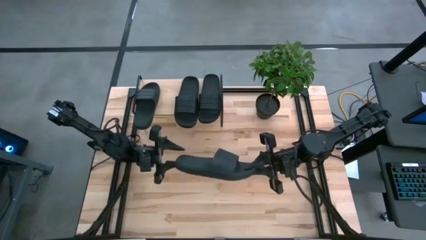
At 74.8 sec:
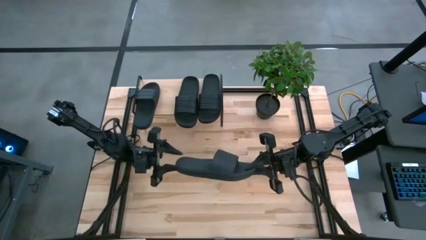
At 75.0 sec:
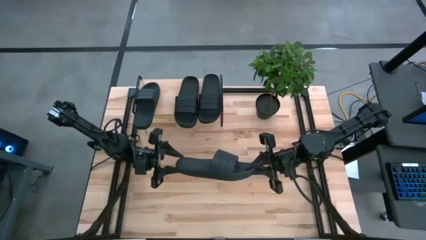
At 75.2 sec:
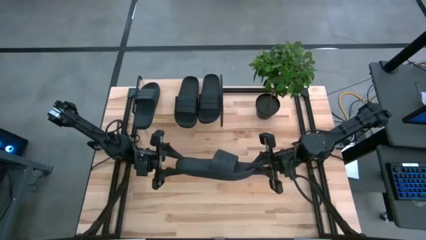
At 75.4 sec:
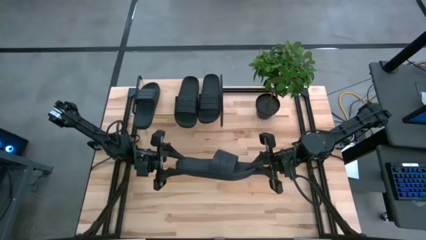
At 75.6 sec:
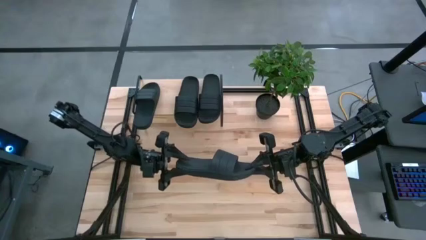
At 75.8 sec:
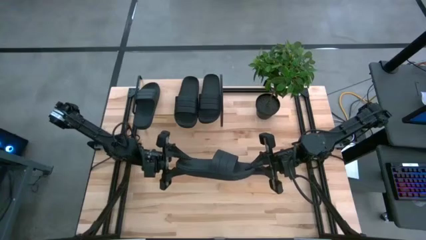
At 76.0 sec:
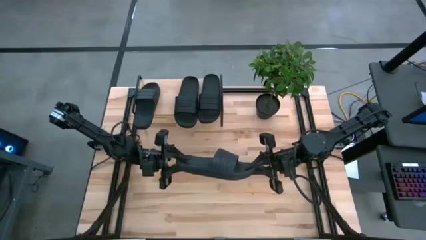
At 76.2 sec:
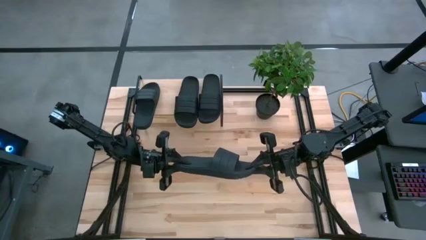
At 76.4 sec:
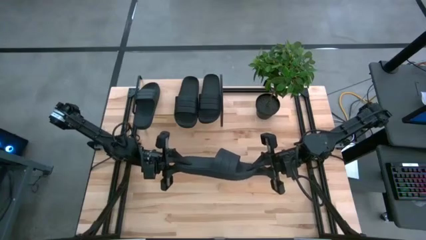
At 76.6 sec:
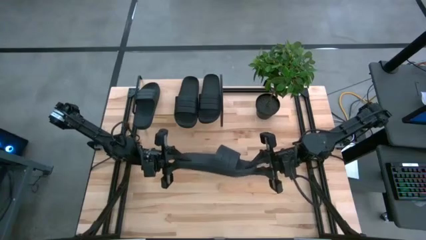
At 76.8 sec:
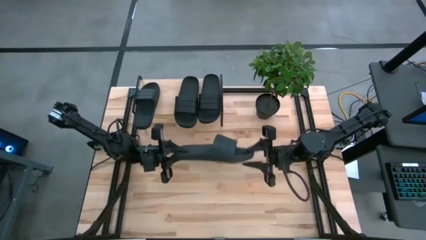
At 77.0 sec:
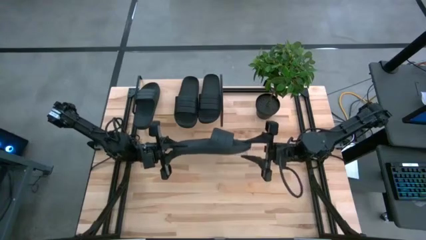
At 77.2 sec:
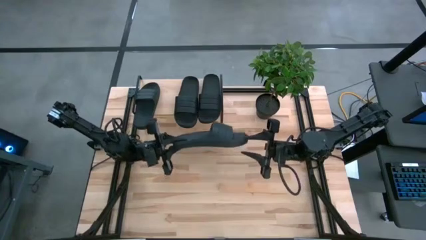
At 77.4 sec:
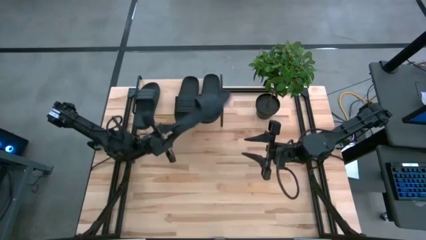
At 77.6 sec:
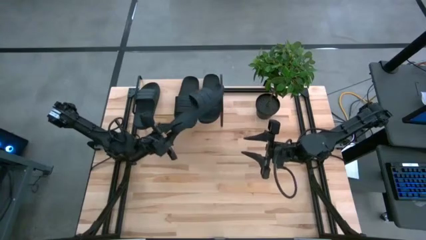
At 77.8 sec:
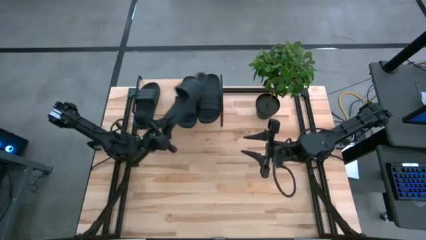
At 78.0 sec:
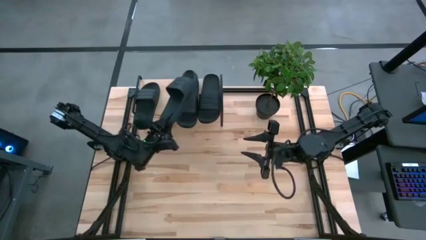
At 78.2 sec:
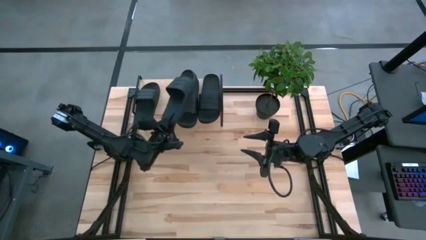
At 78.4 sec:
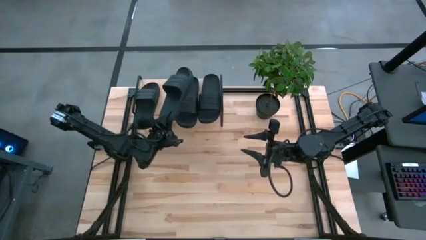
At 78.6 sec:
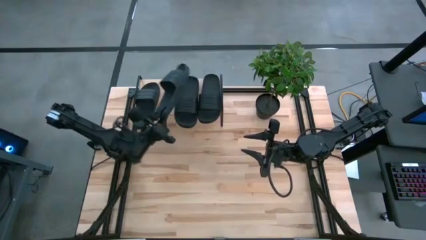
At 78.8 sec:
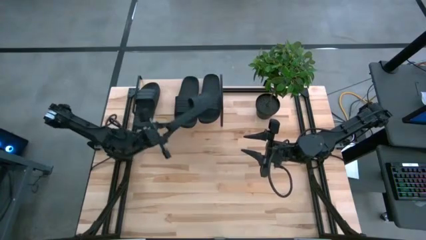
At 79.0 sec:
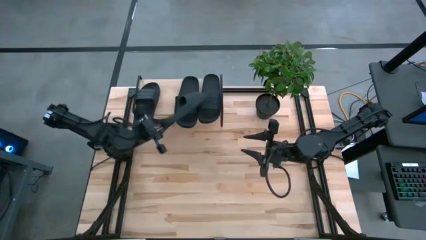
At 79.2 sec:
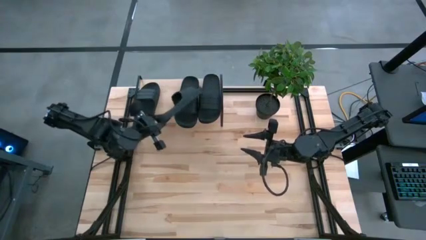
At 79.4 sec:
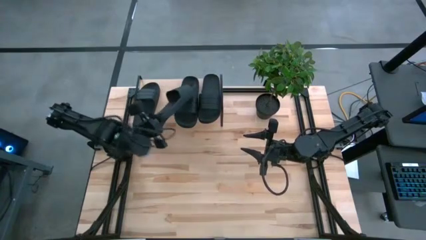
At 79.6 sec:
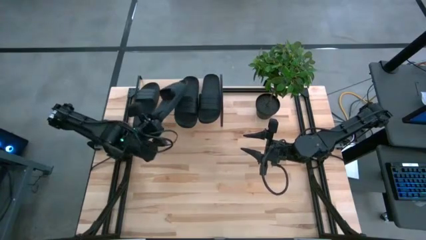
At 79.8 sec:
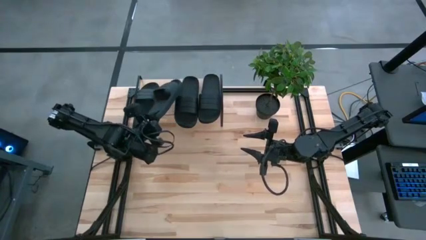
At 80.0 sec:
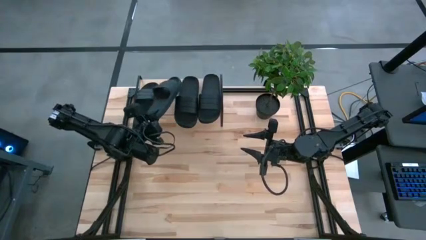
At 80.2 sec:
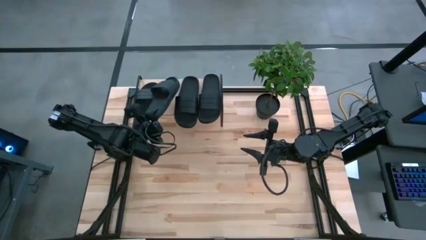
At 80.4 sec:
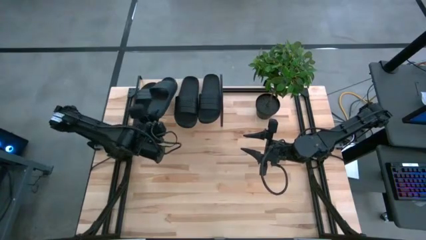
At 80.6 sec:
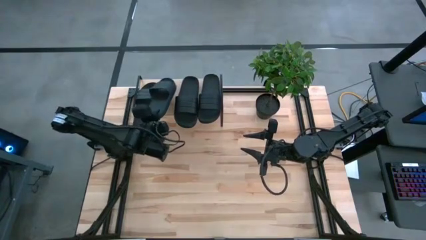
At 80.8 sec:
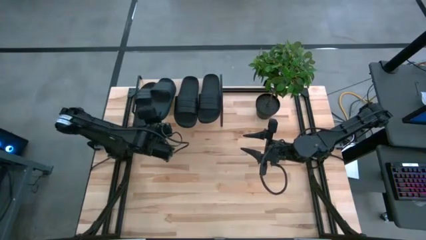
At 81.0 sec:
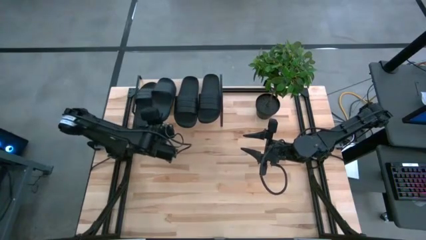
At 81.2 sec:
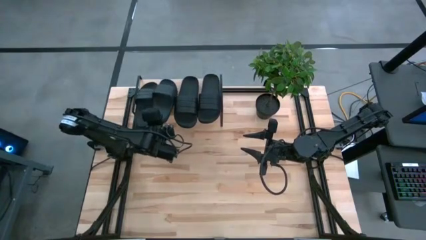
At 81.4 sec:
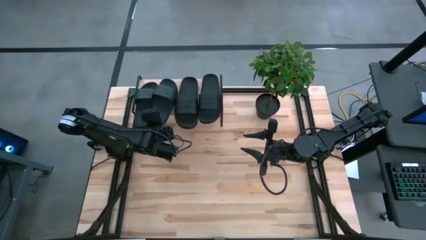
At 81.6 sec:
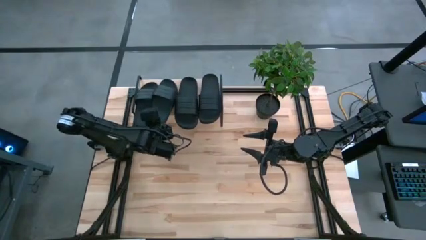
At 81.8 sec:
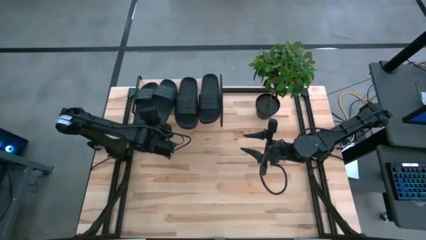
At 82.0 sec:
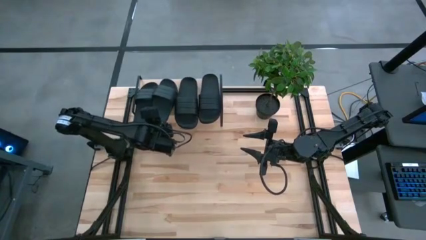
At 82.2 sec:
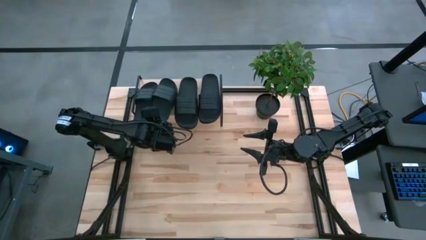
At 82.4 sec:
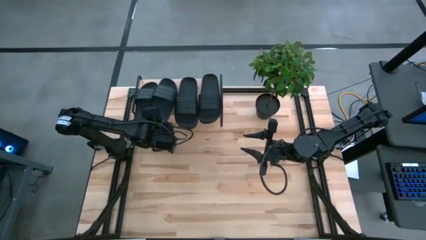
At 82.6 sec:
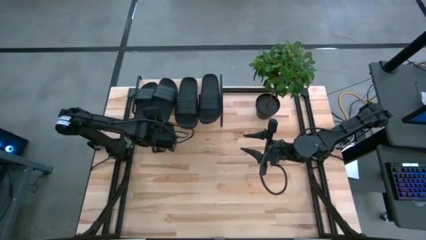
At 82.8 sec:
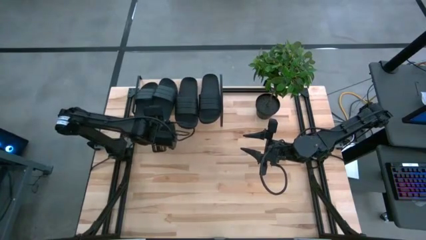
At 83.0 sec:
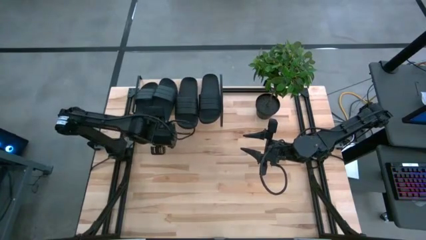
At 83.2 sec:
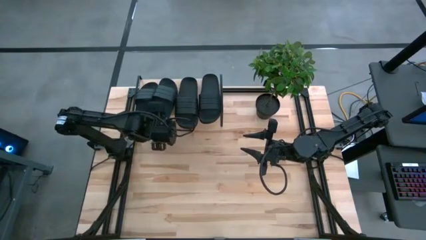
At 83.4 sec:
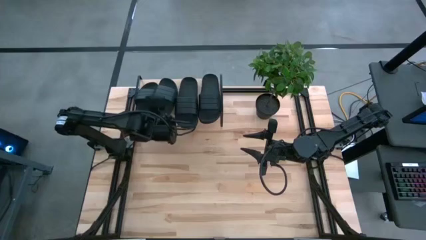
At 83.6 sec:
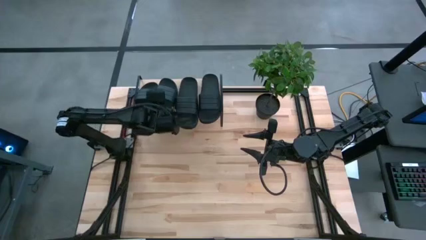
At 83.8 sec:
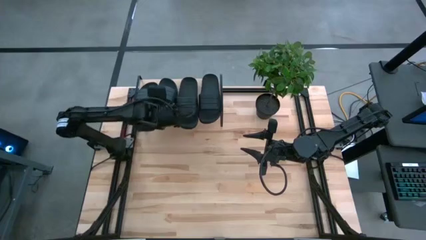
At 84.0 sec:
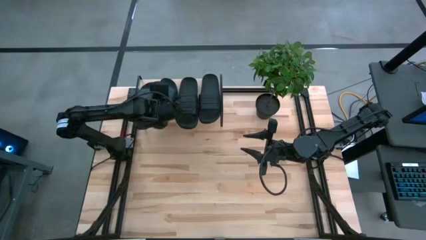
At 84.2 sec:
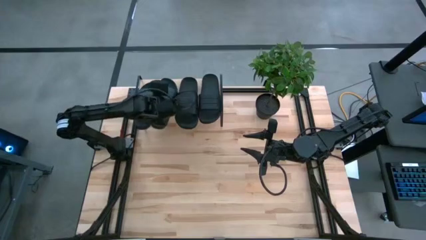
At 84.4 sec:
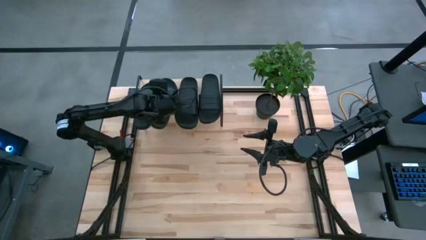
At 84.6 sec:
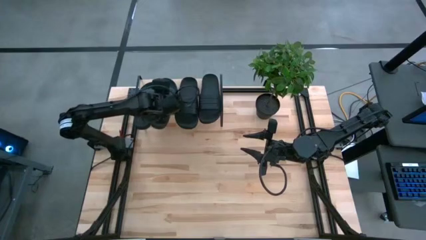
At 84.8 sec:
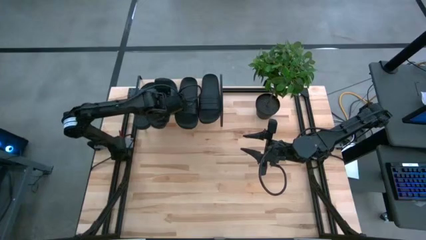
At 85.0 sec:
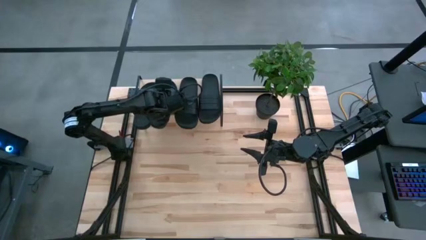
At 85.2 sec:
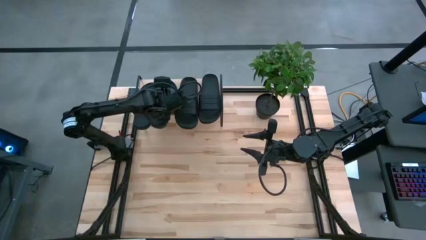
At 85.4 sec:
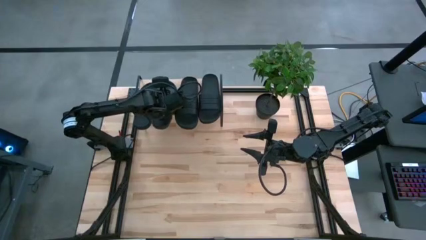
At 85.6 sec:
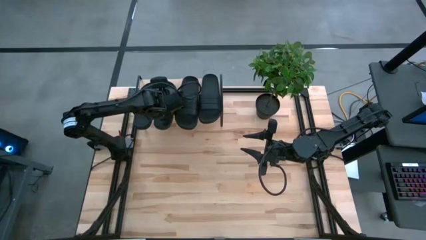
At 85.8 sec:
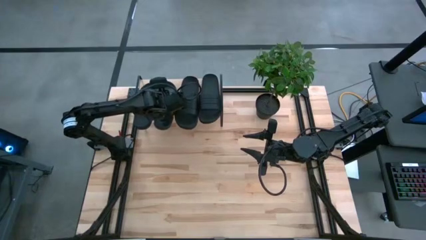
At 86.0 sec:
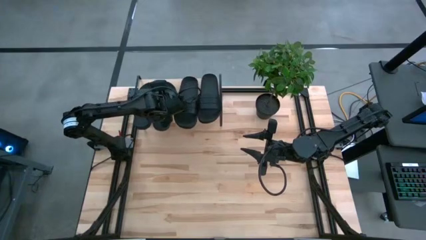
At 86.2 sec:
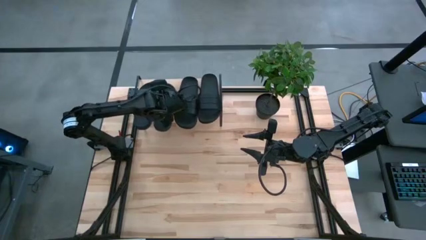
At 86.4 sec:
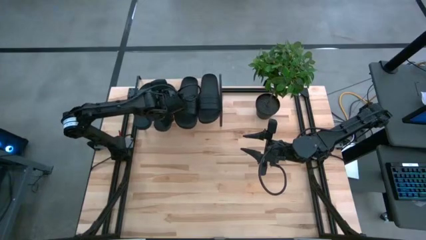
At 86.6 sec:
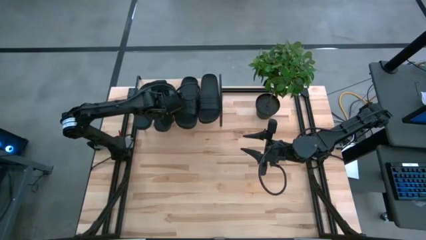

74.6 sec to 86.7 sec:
Task: Pick and place slides into the shelf
Put the black slipper on the shelf
